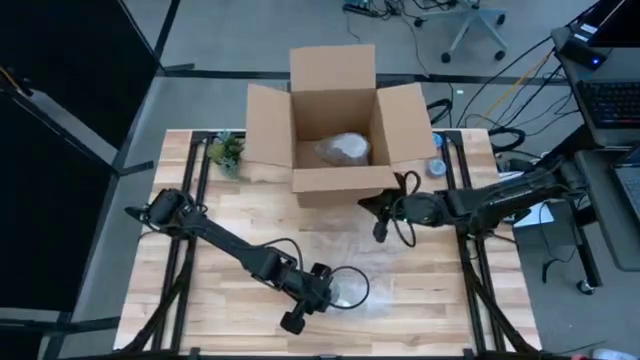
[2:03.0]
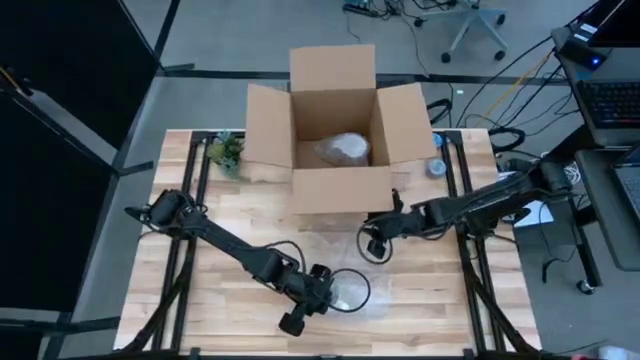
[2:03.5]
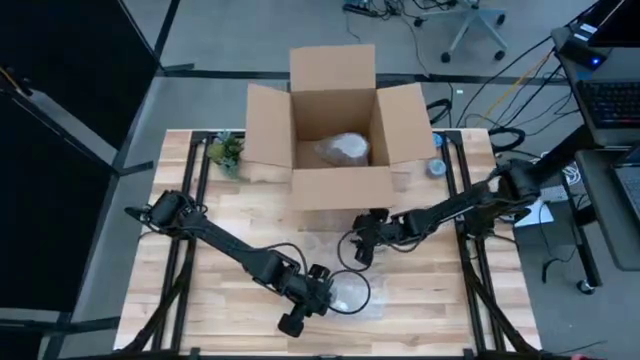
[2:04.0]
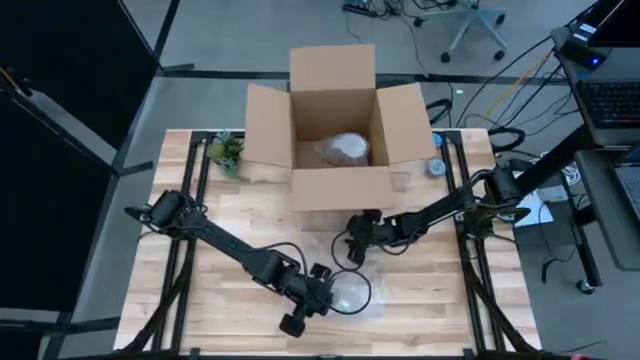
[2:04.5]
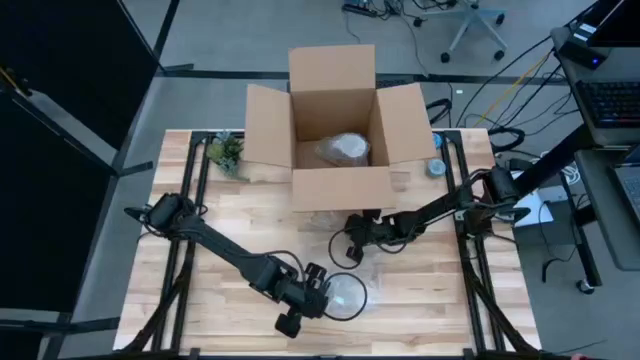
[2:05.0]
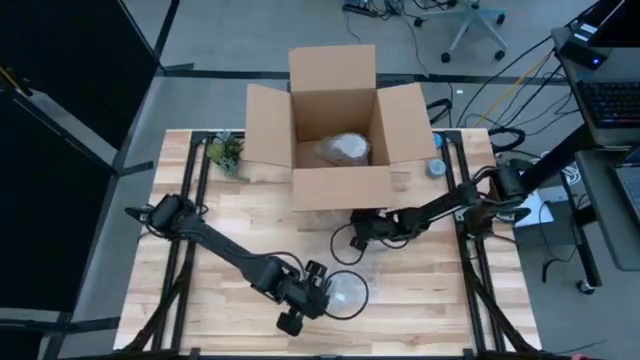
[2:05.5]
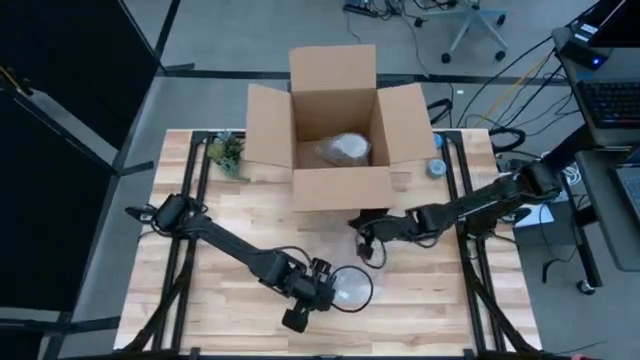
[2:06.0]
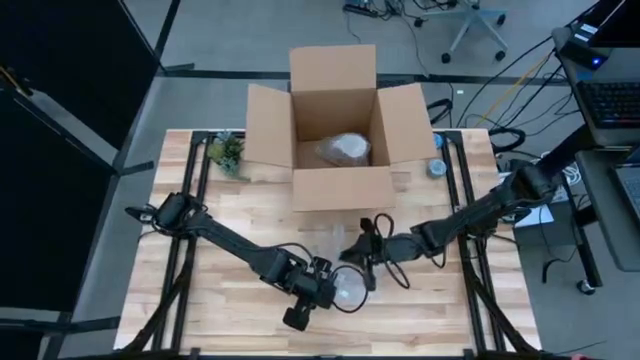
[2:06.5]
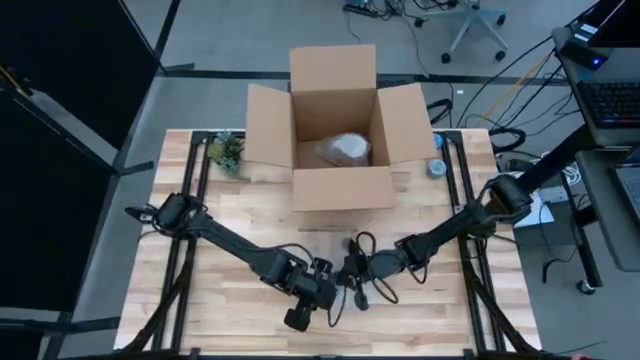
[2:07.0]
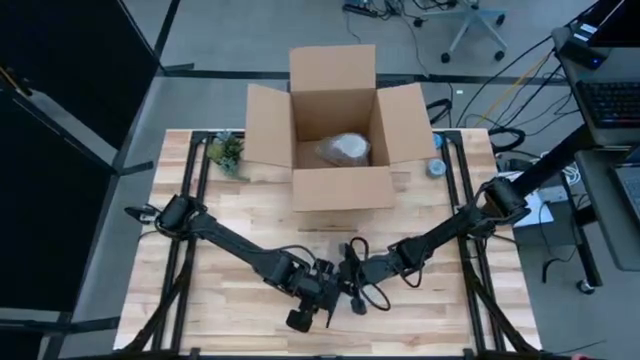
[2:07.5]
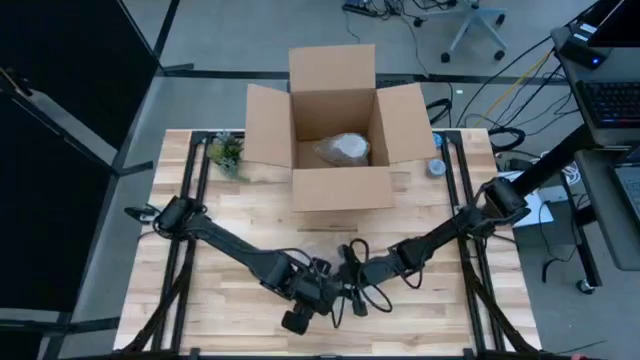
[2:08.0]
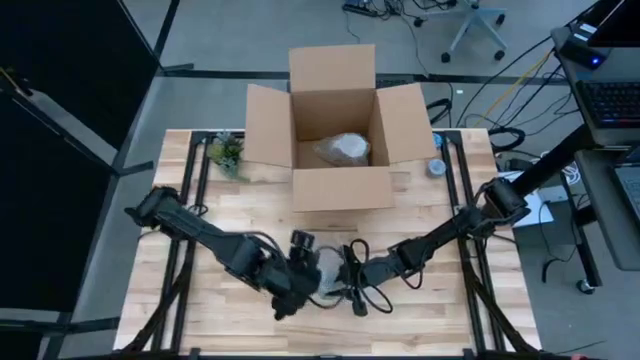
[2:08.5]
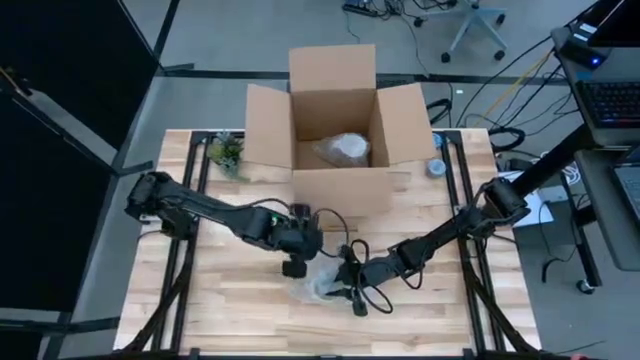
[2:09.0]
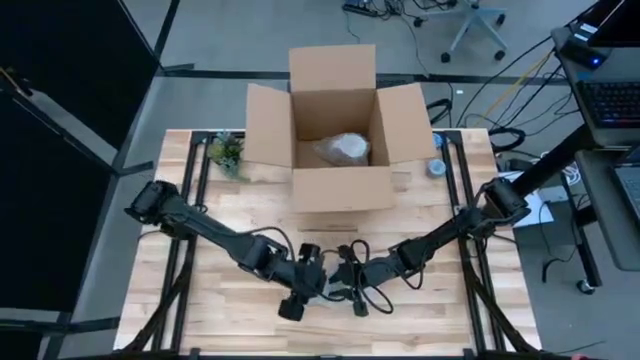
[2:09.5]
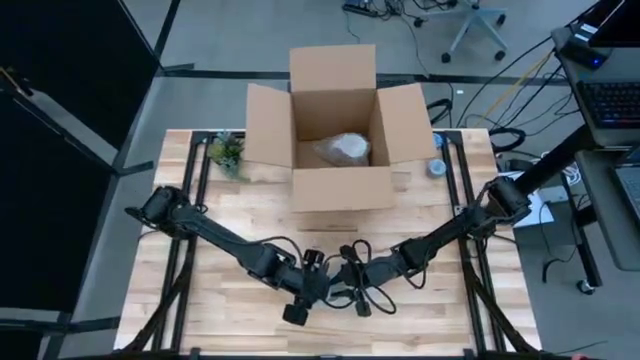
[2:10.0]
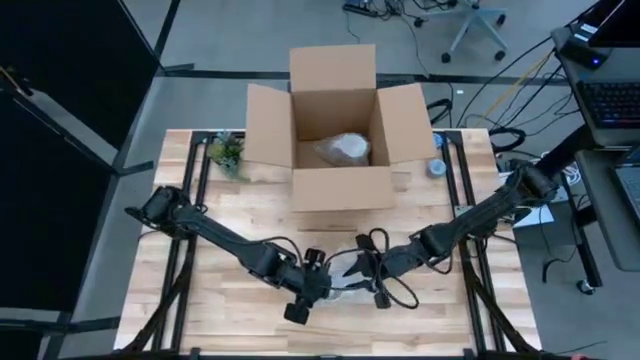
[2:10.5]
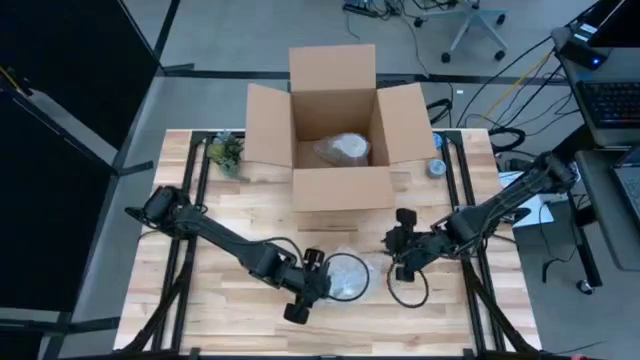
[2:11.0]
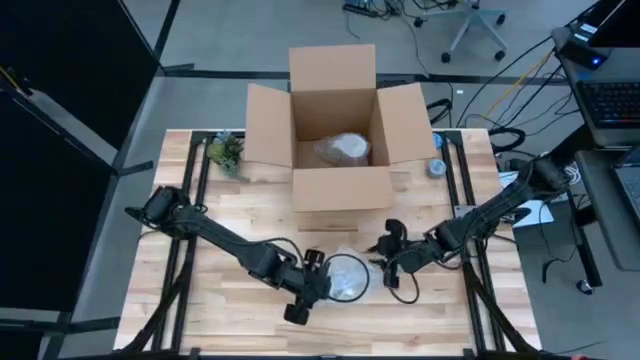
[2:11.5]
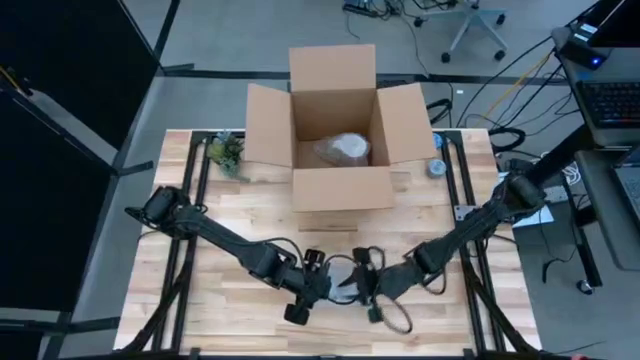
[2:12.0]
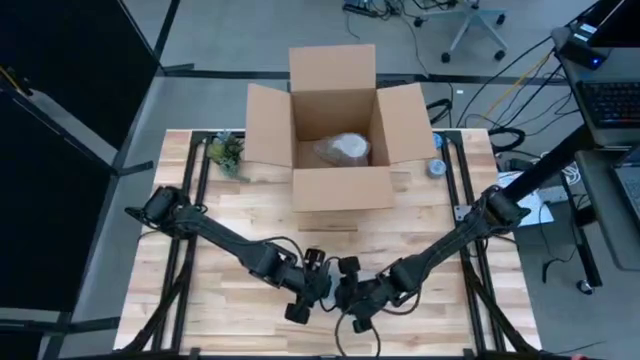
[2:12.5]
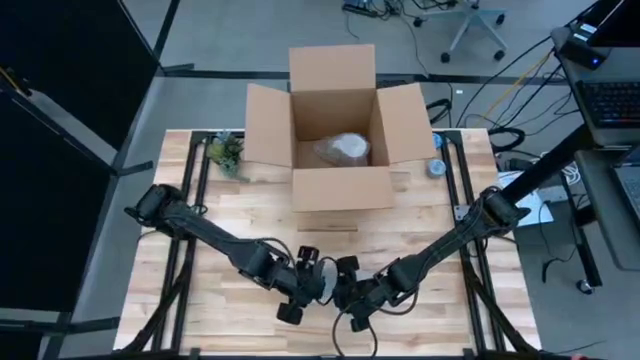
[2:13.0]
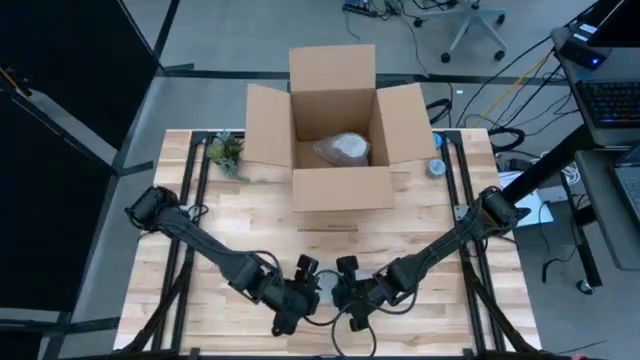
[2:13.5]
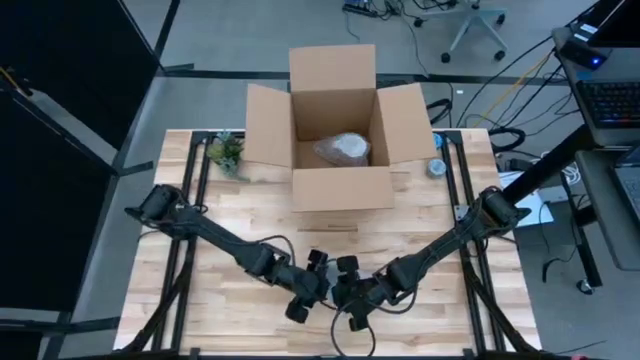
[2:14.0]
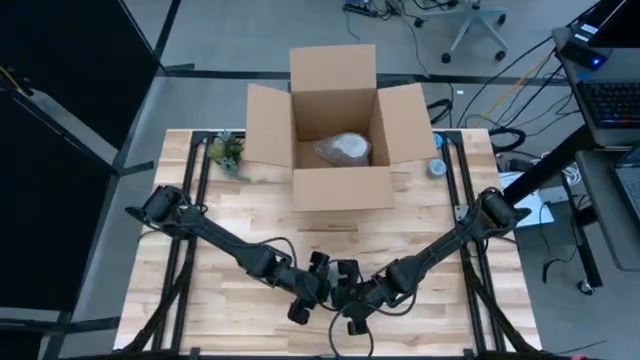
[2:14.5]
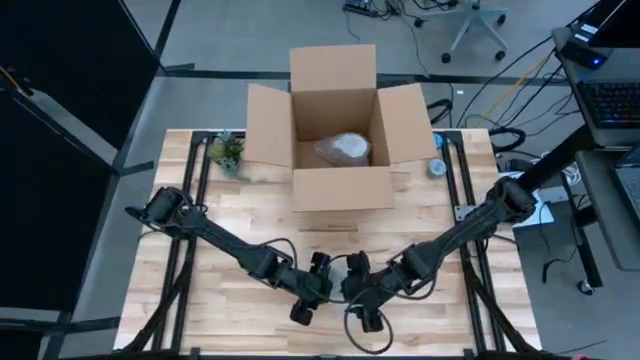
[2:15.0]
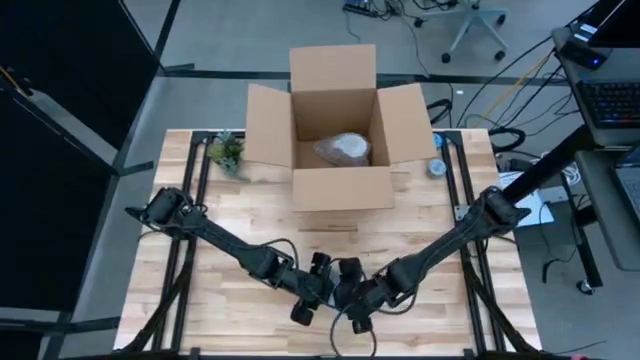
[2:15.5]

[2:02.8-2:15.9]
Task: wrap mug
Wrap the orange mug with bubble wrap

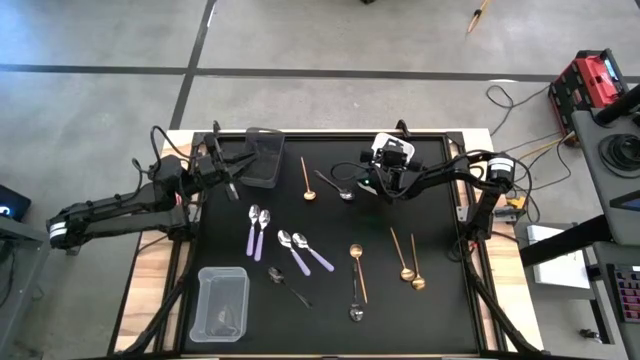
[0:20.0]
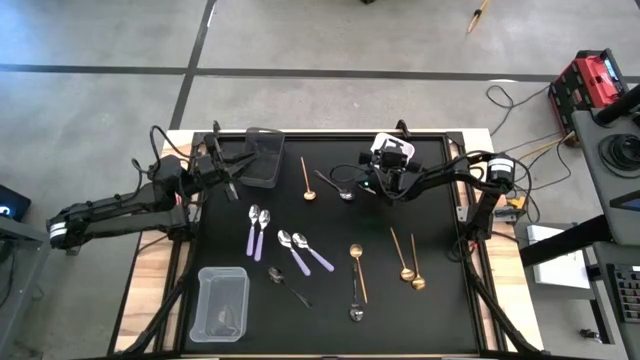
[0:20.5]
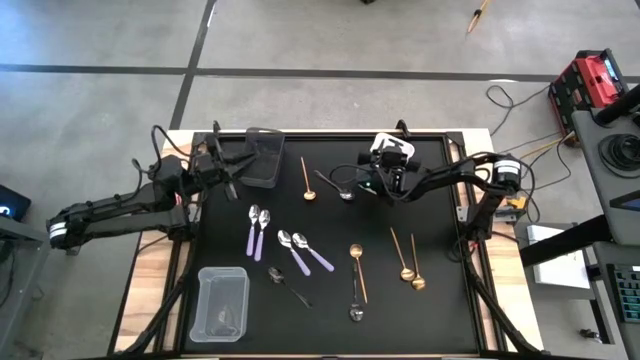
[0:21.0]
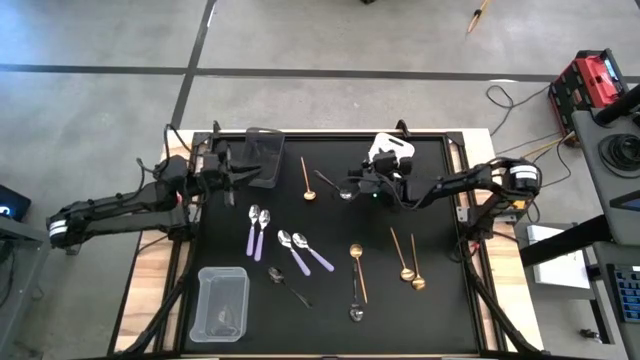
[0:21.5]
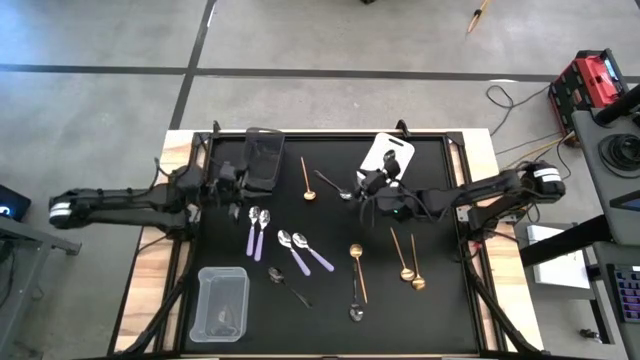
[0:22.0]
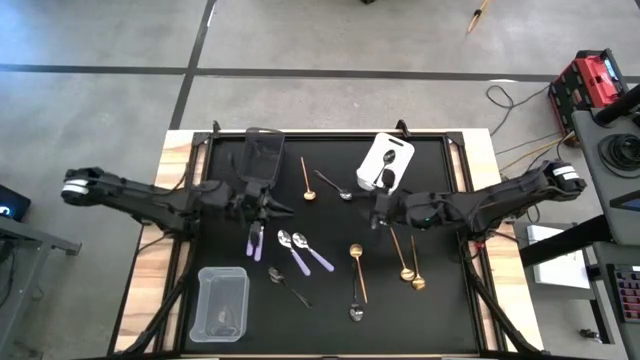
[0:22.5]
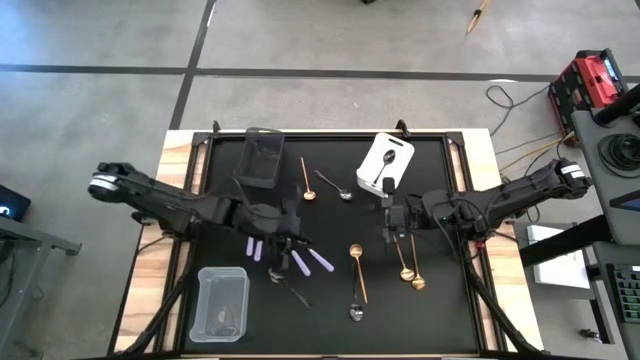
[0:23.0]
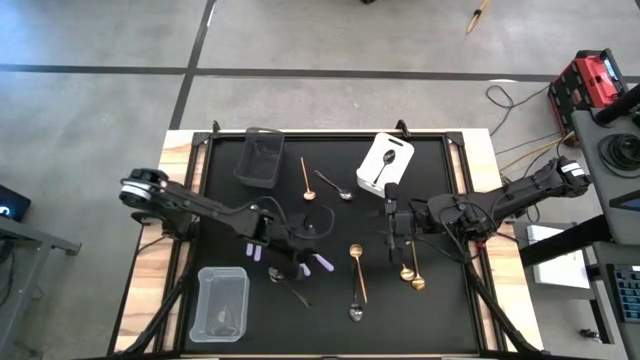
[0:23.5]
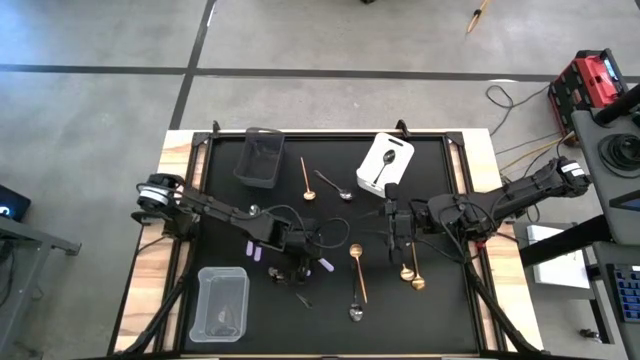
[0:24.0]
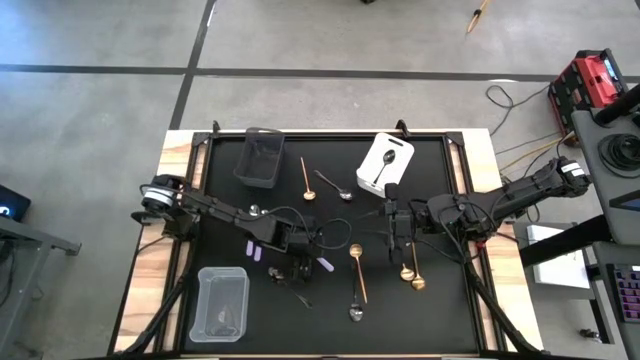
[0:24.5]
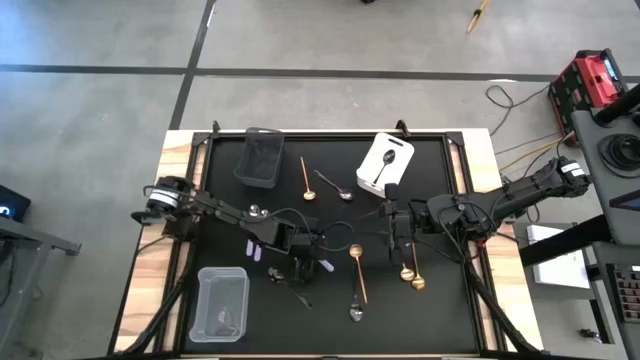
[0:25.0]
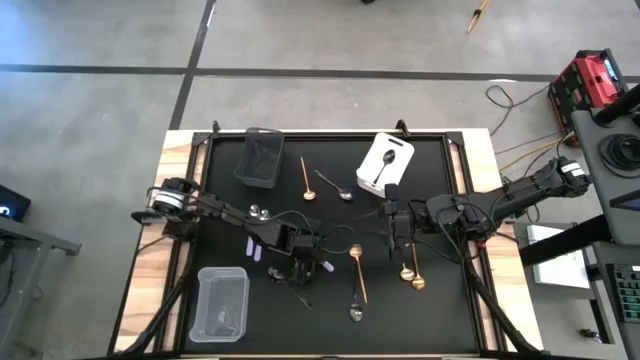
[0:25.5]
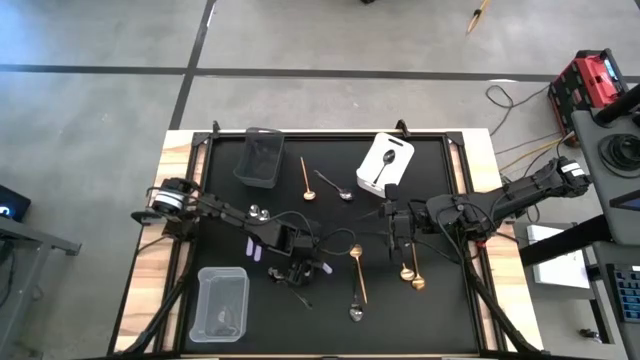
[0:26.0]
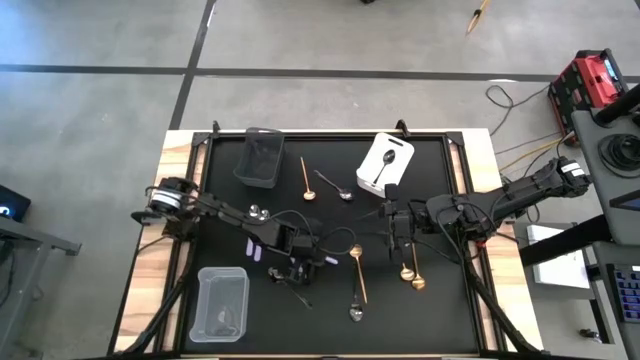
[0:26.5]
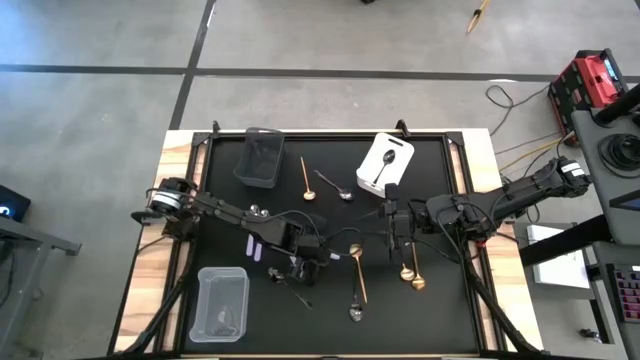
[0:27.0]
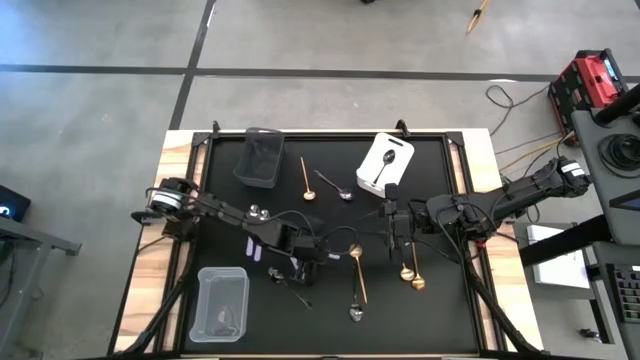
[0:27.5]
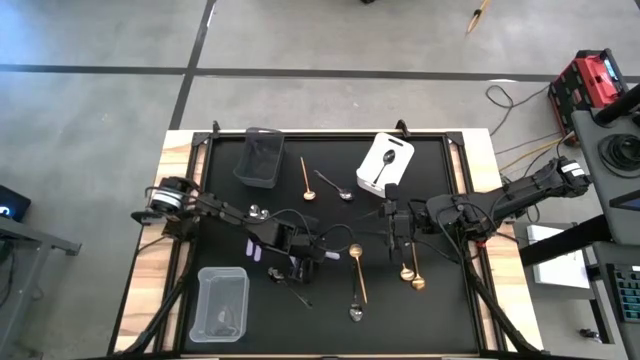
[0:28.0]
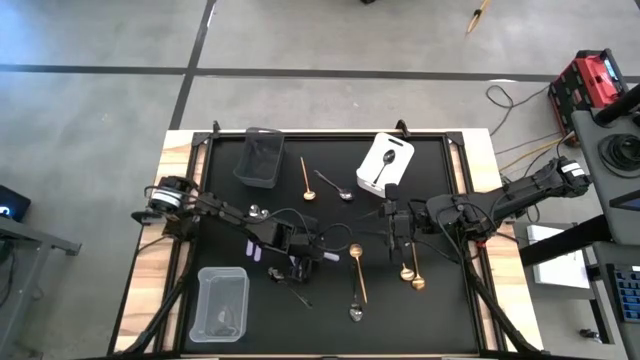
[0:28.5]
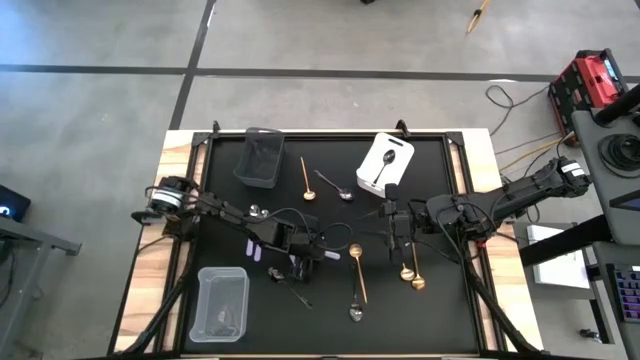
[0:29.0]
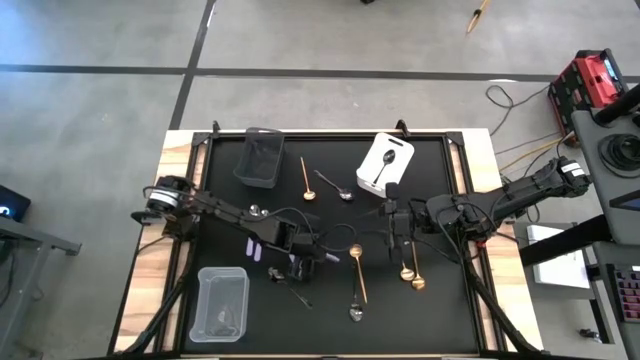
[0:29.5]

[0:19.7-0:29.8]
Task: Sort silverware by color (type)
Put the purple spoon into the transparent bin
